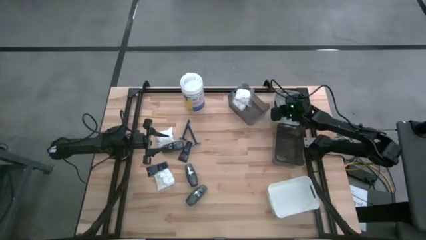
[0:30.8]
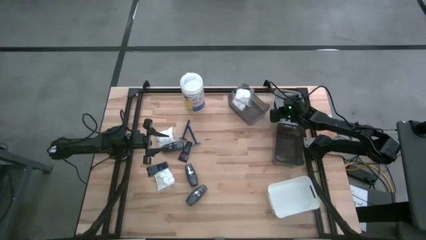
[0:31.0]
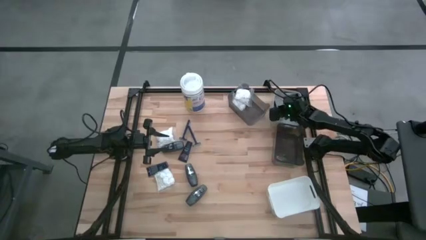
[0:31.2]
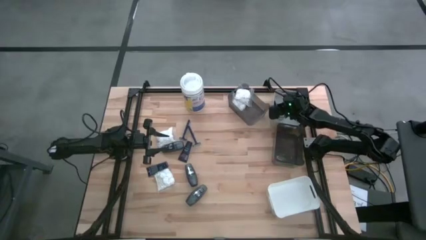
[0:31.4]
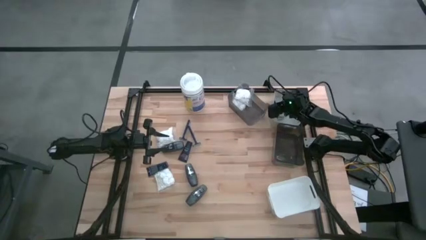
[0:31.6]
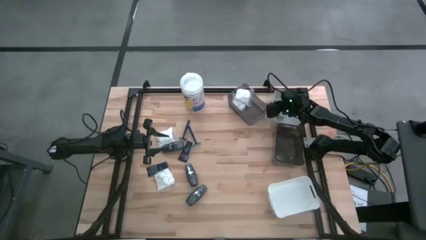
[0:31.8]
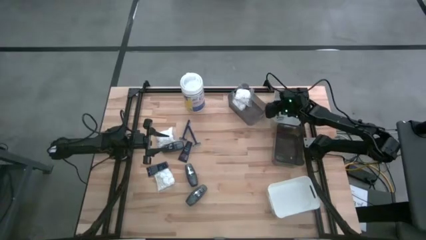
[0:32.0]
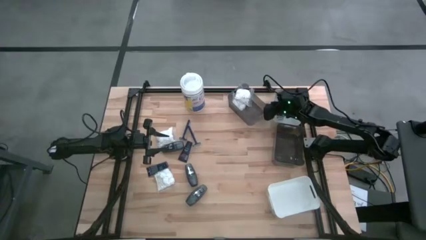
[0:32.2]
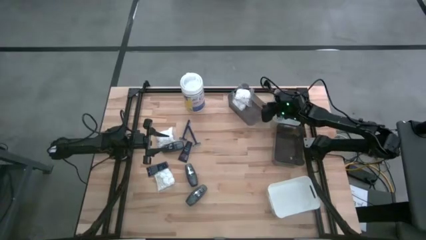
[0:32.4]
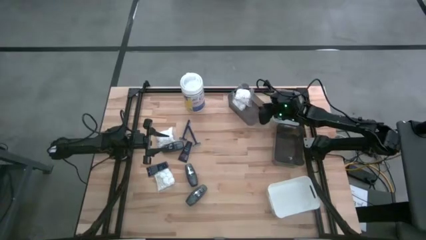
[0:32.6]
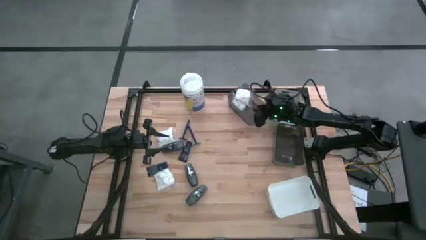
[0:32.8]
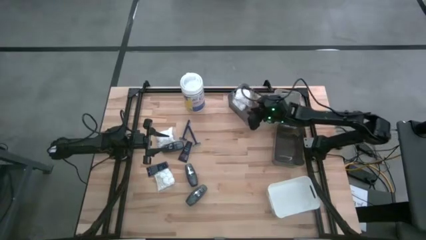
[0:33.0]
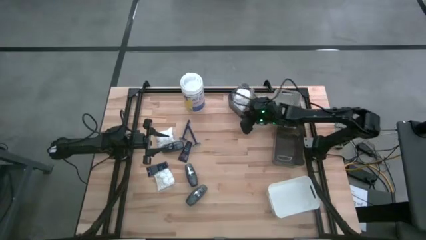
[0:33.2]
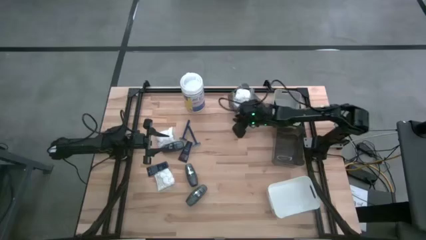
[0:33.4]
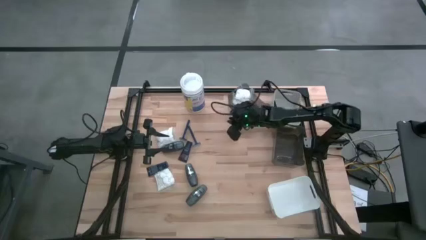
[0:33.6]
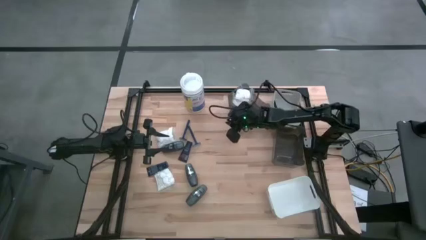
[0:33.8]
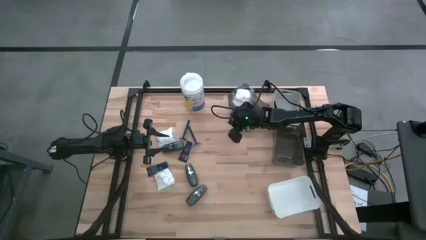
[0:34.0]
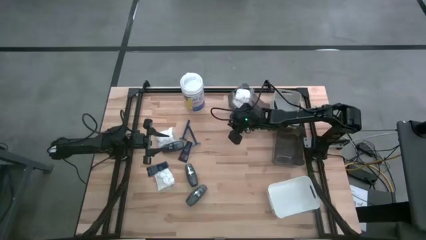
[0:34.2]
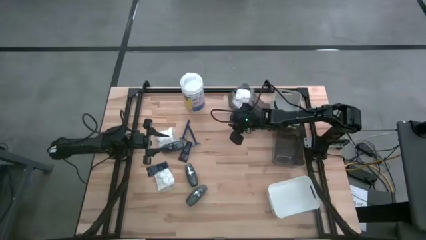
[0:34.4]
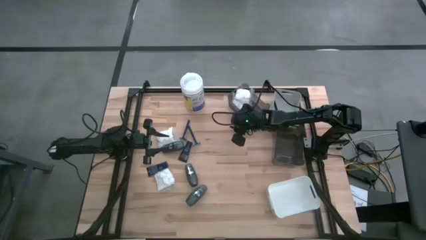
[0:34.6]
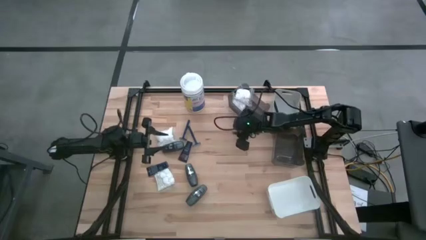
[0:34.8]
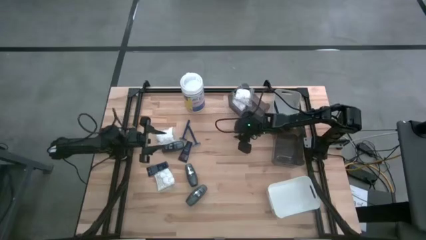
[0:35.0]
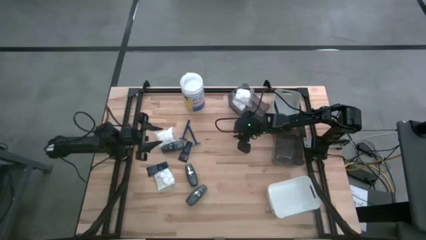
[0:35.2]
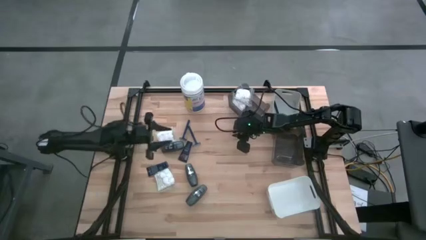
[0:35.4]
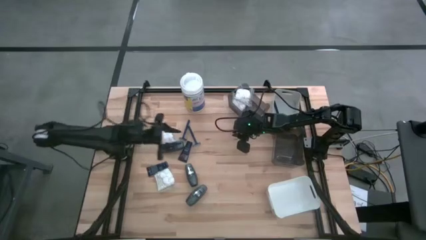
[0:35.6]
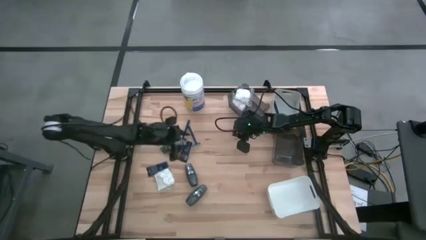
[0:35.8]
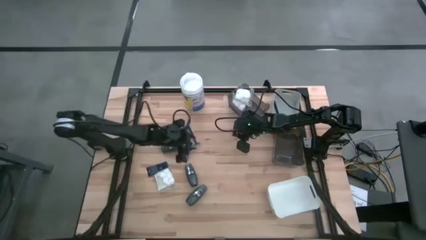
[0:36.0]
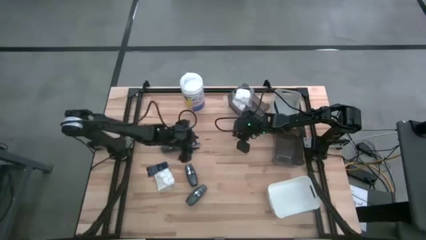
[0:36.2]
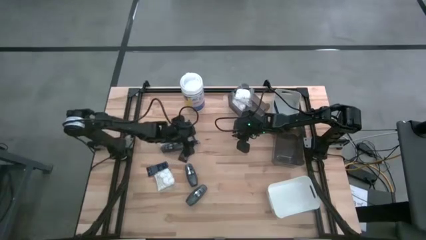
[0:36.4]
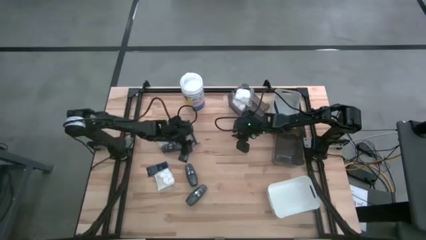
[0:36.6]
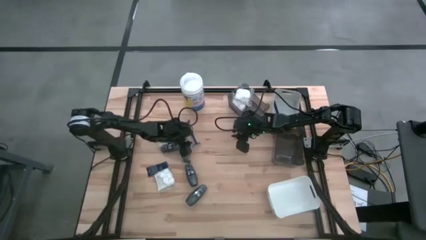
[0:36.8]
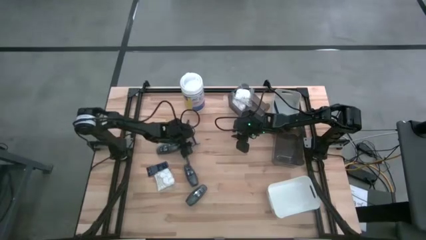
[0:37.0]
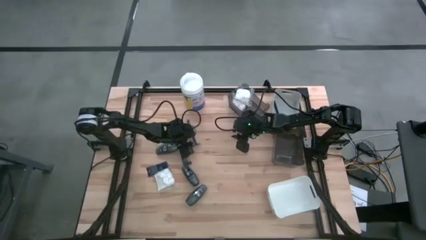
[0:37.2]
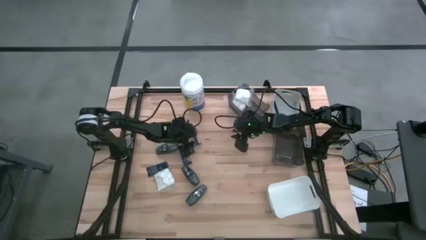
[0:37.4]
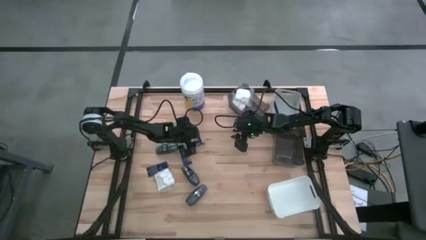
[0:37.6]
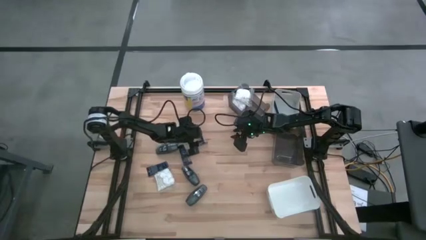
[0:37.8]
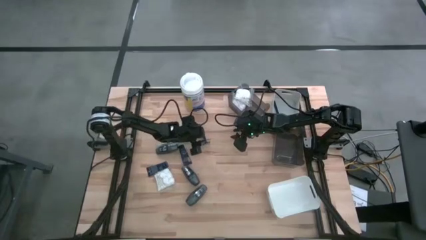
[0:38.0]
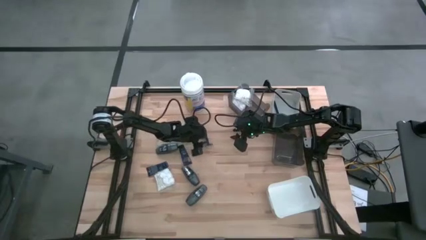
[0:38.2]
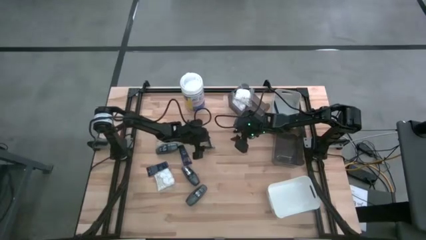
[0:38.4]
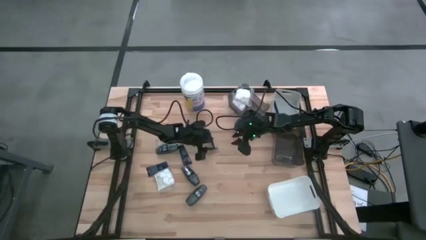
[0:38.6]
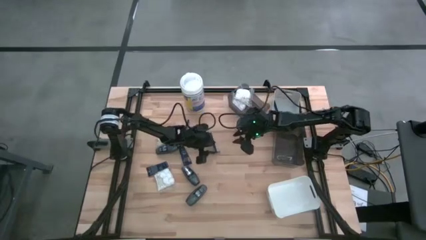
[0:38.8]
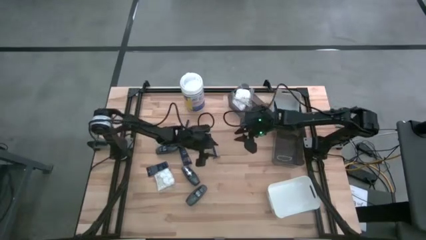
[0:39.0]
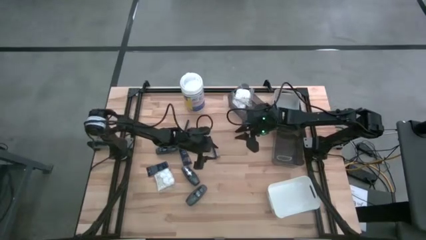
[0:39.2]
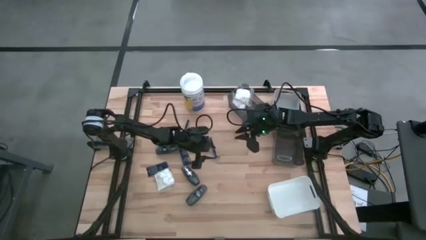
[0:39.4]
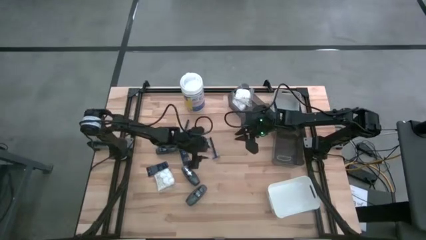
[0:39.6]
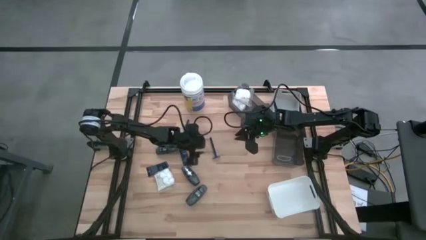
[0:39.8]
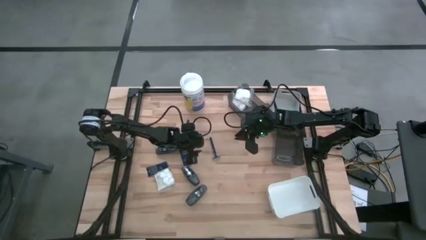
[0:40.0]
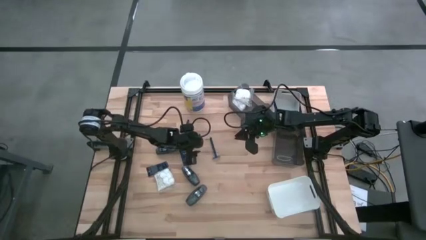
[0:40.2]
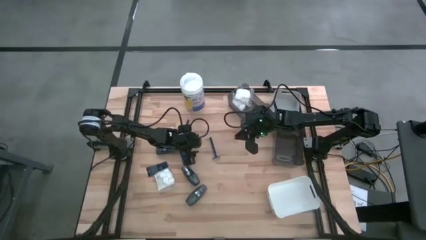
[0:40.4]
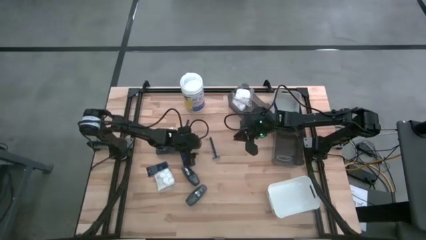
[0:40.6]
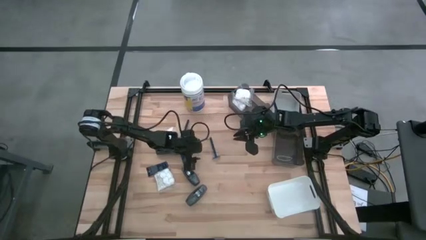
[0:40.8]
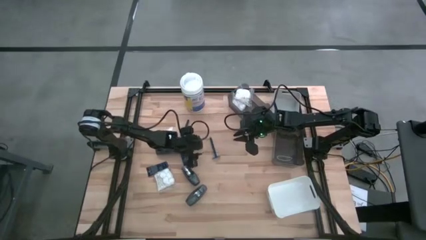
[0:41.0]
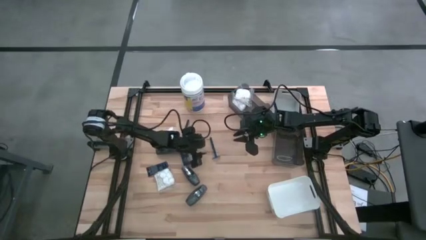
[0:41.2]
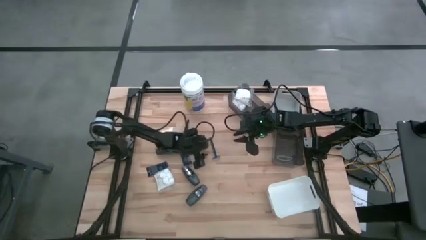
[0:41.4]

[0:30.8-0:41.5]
Task: Pick & Place Travel size toiletries
Put the right blue razor into the gray bin
